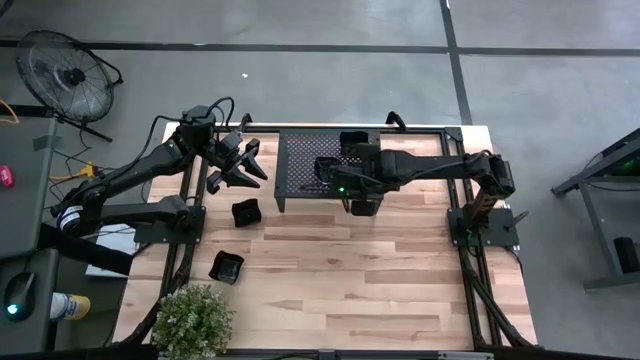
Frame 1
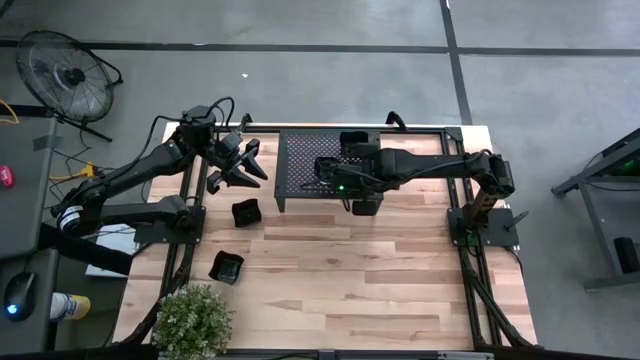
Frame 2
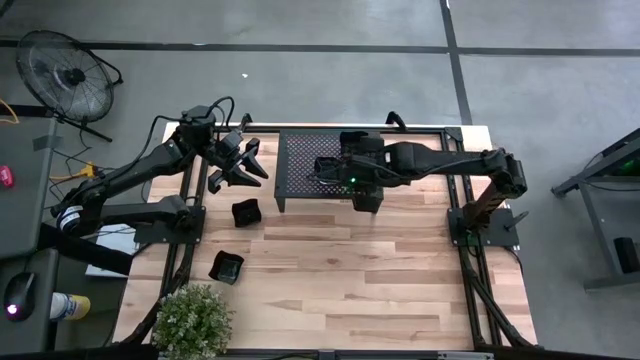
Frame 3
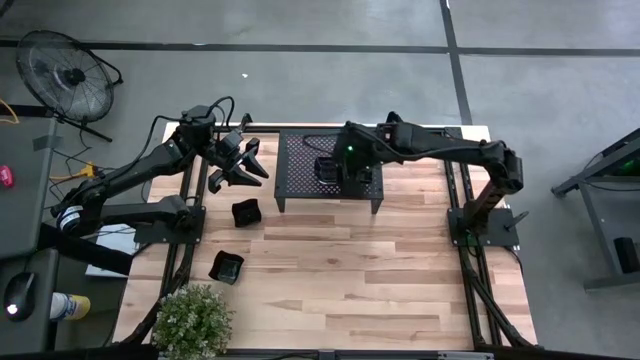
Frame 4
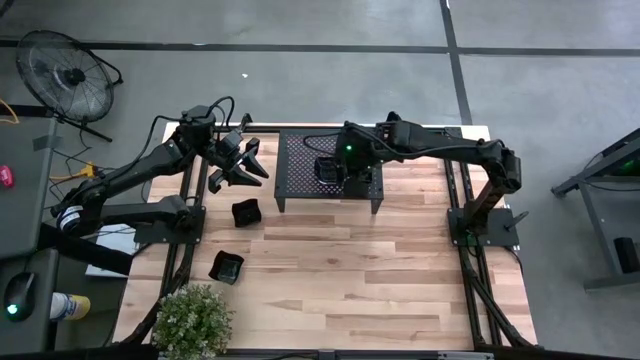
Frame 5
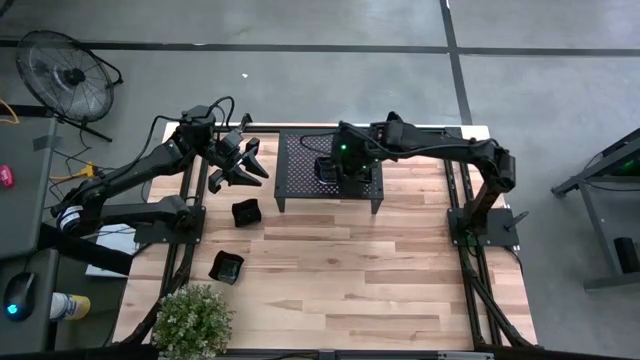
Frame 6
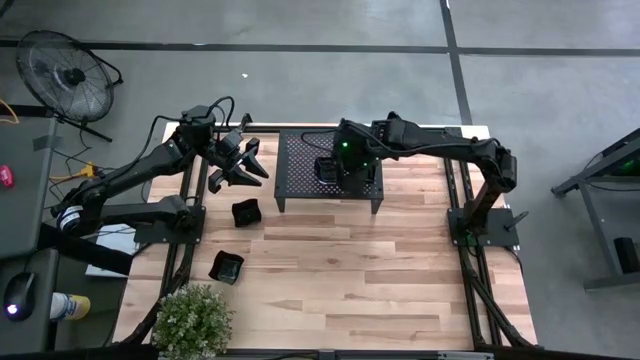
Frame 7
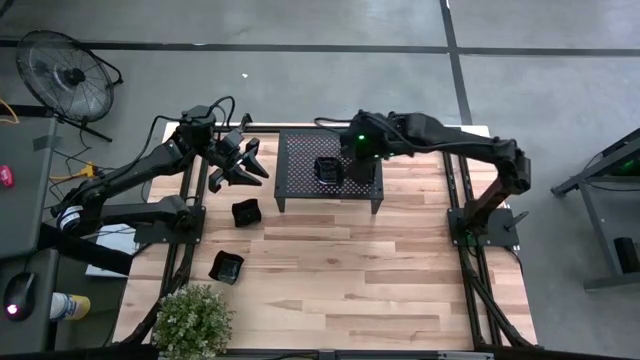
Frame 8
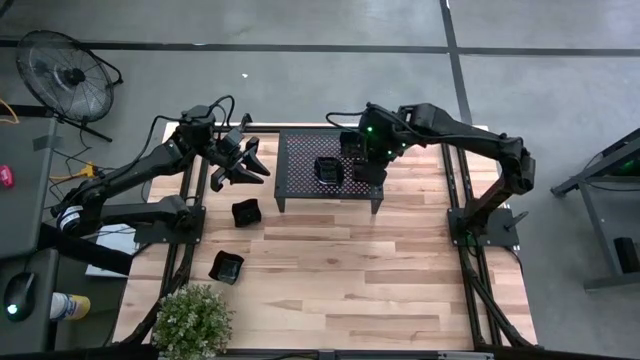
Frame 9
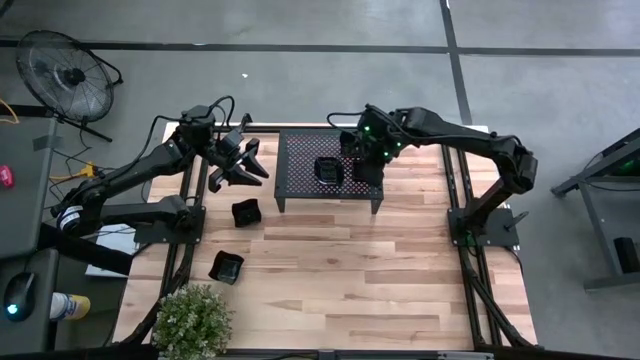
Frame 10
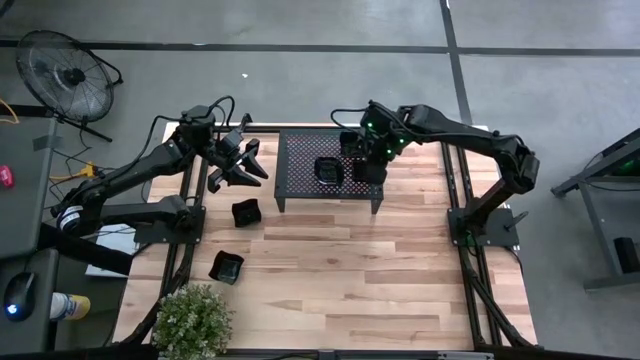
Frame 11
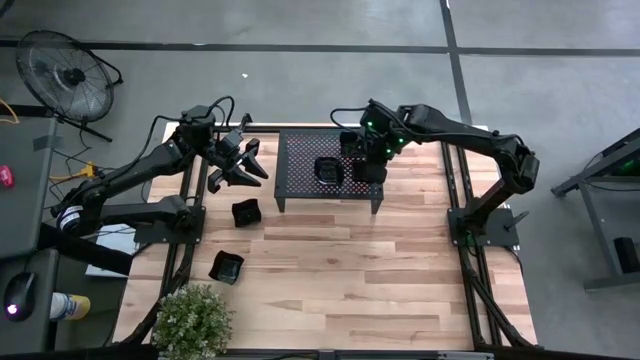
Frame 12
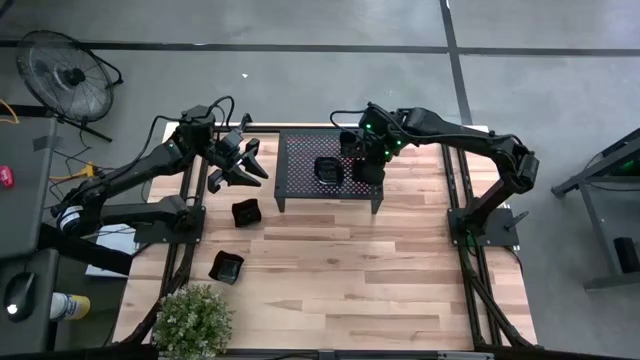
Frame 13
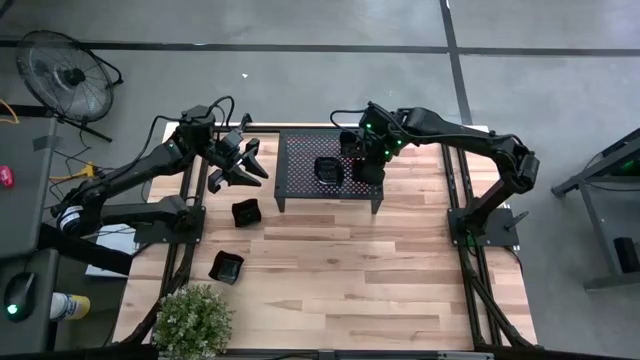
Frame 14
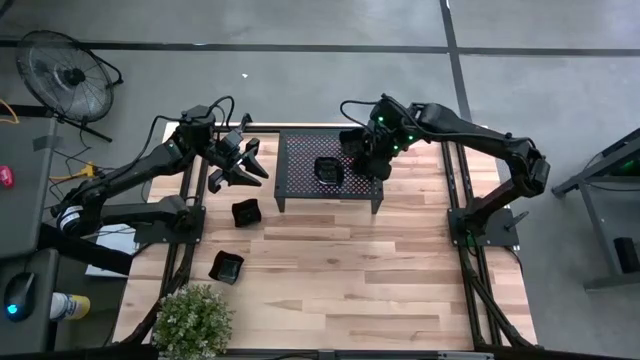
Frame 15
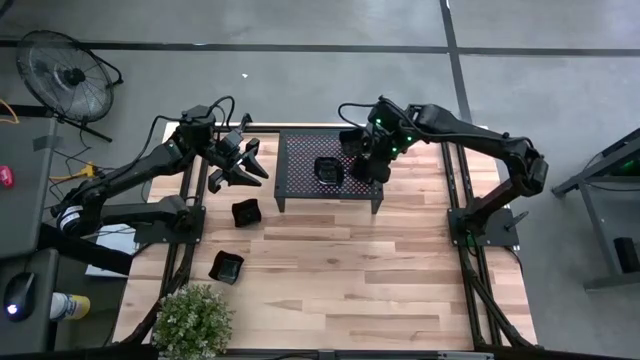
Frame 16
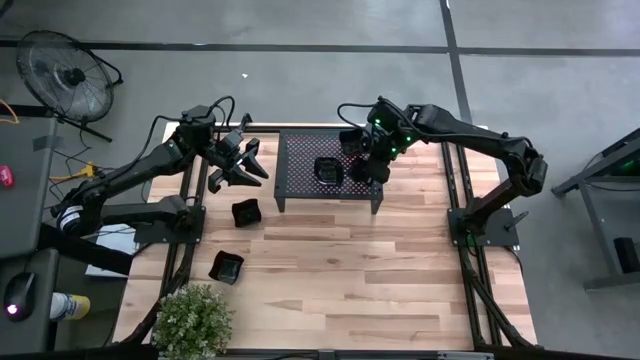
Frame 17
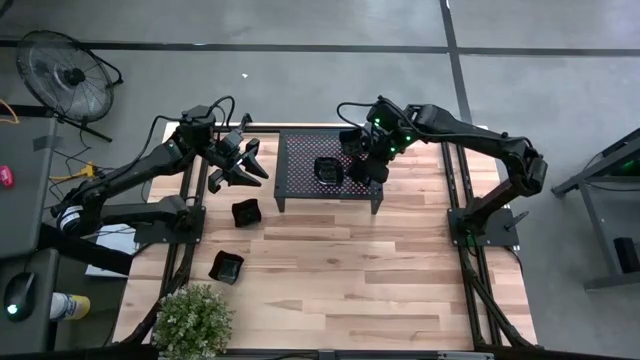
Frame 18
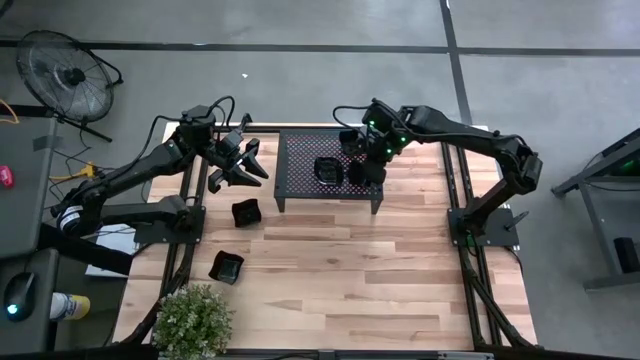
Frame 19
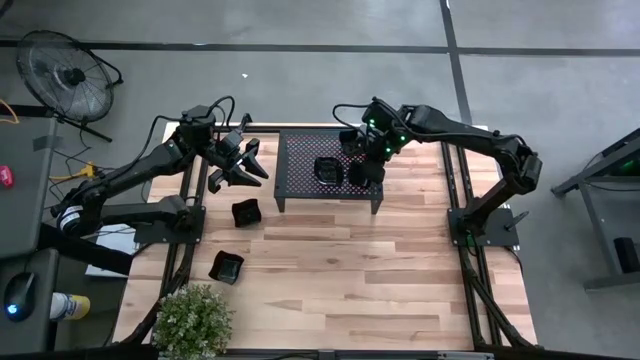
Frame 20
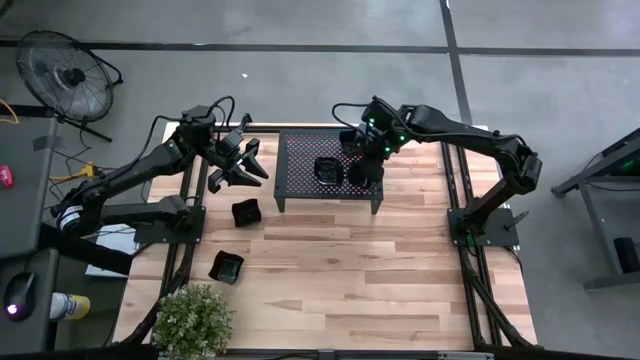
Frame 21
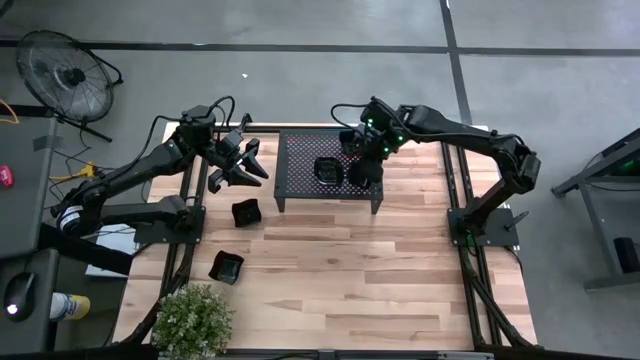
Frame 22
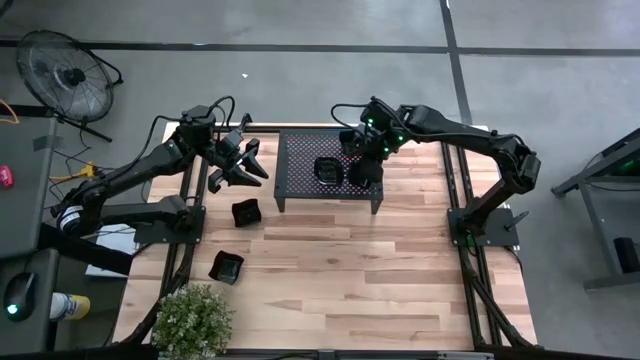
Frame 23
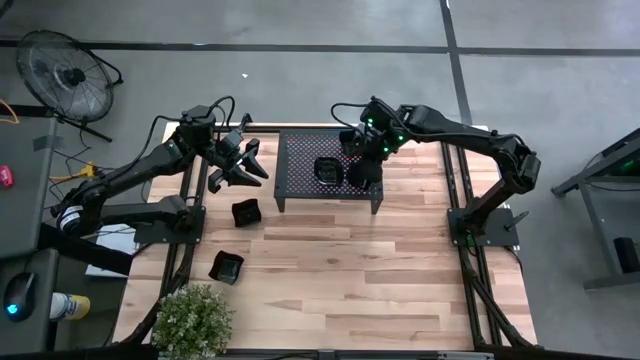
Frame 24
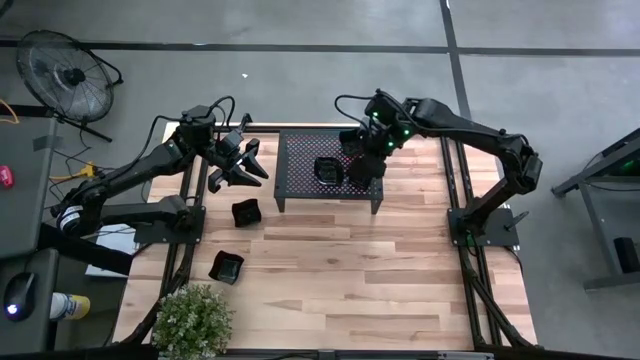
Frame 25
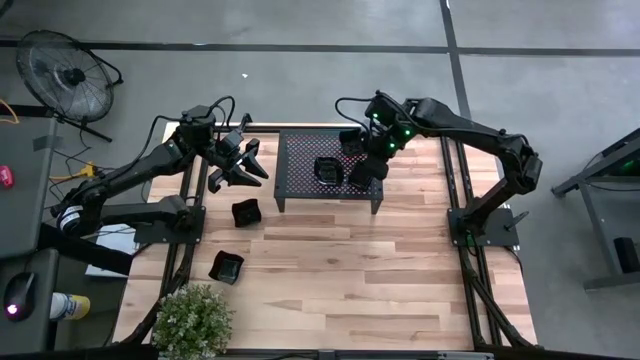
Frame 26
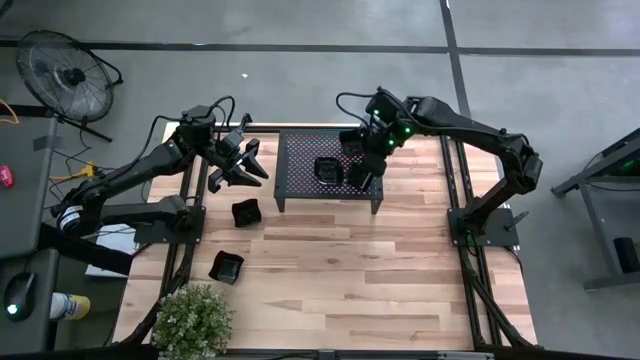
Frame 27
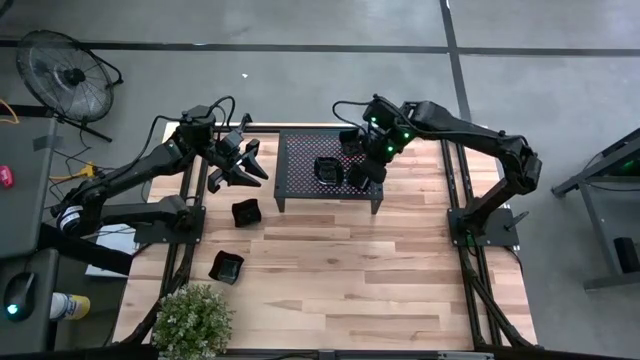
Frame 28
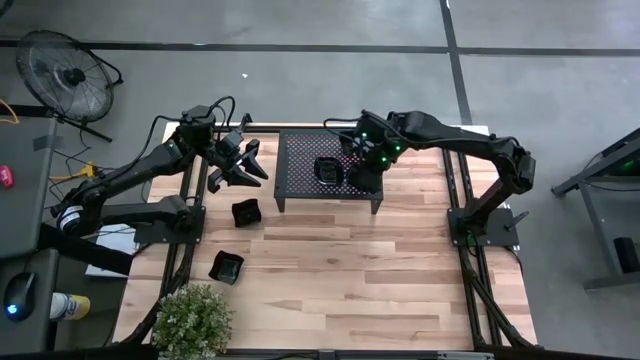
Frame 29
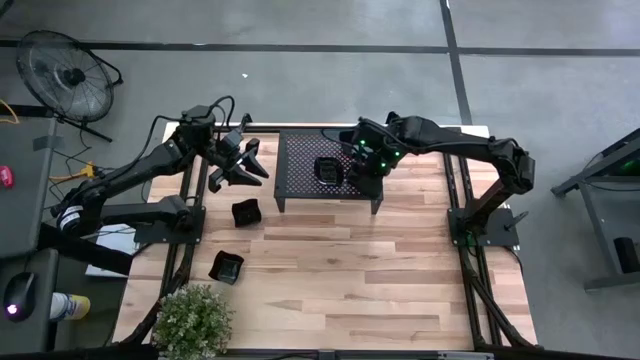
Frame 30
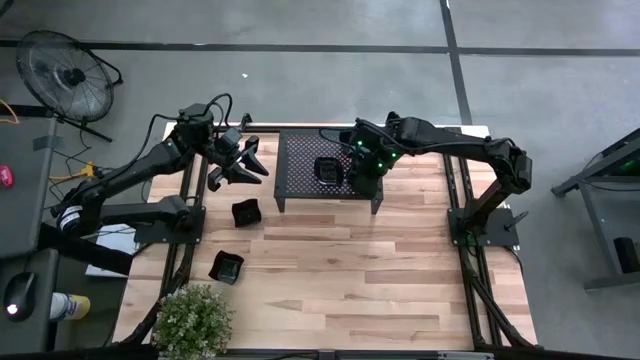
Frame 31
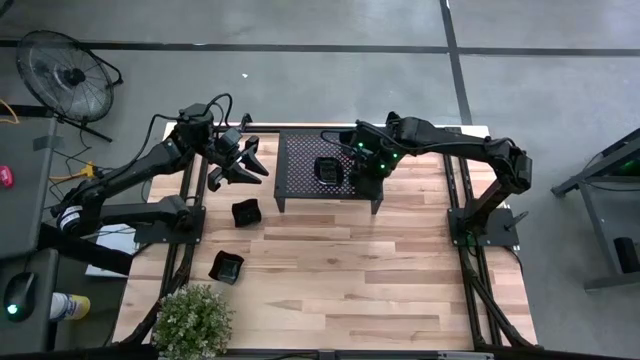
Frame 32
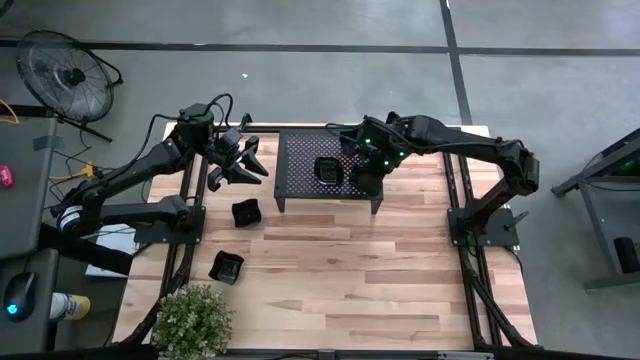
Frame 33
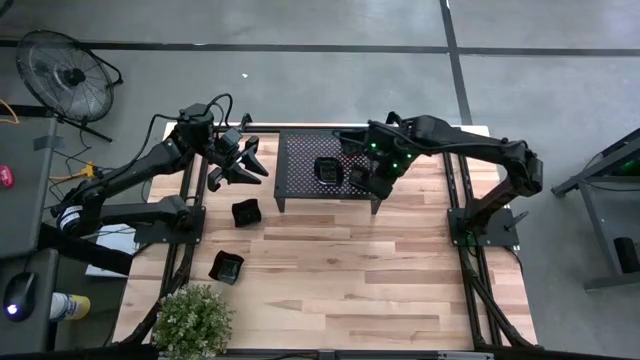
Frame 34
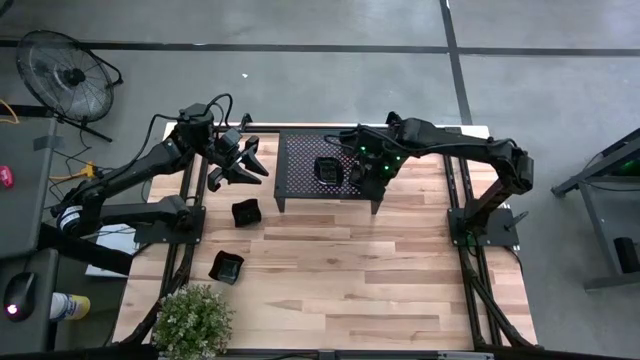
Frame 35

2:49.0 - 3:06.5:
Task: Pick & Place Mini shaped plates
Stack the black square plate on top of the other black square plates on the shelf

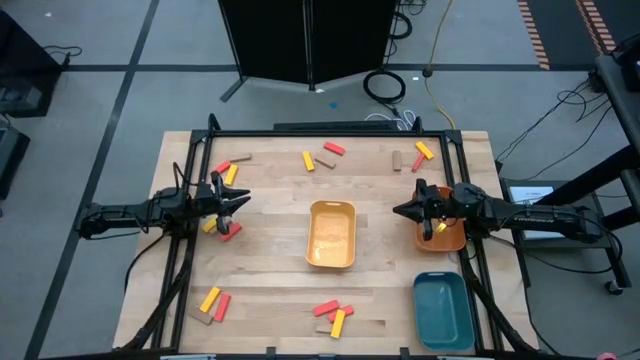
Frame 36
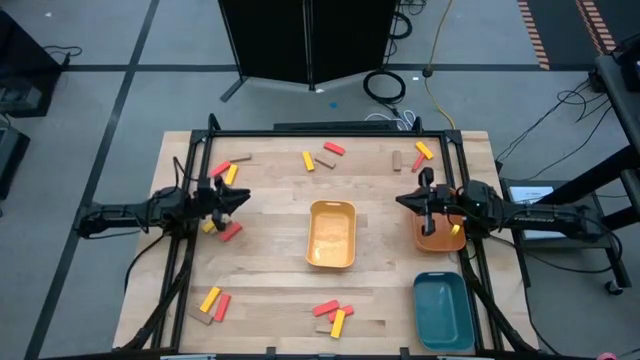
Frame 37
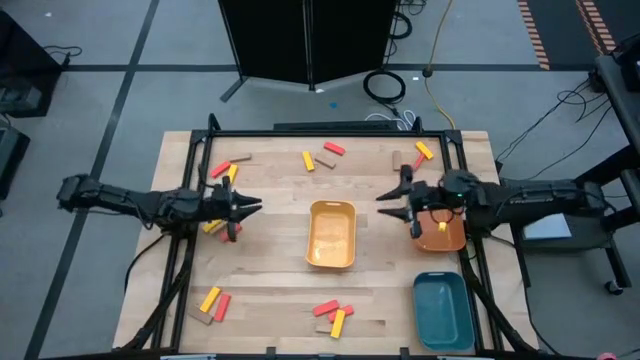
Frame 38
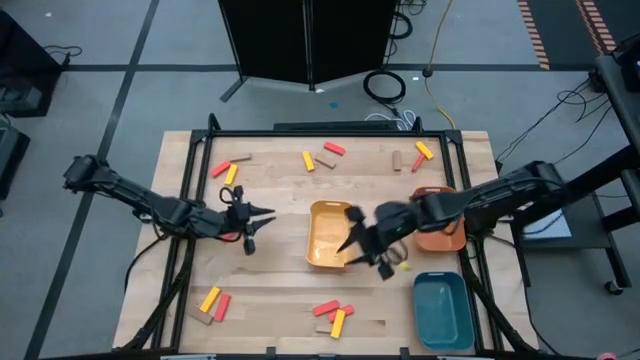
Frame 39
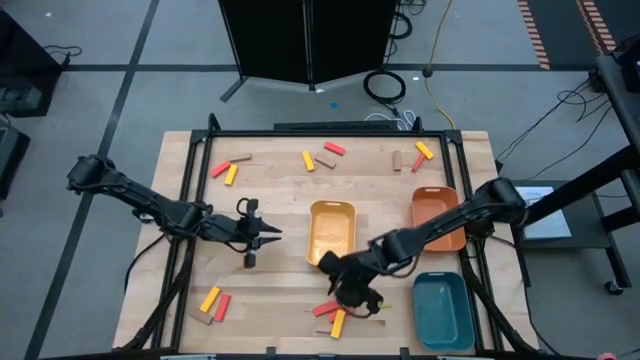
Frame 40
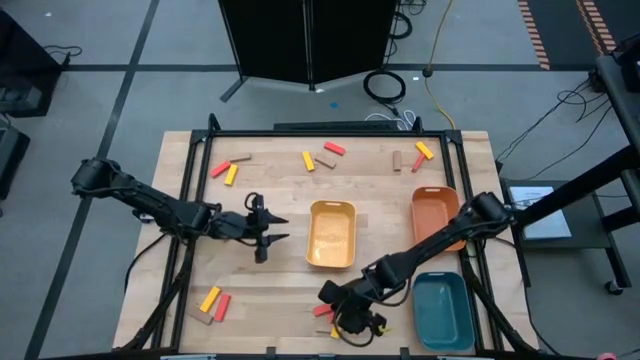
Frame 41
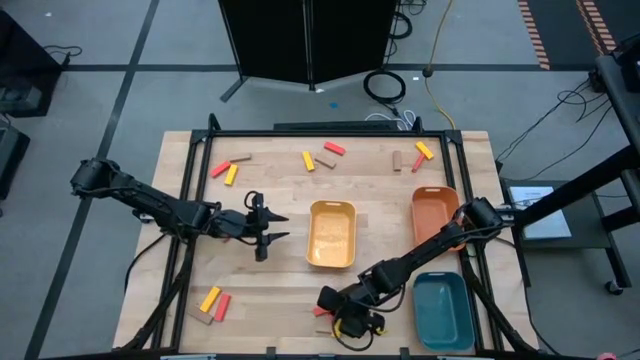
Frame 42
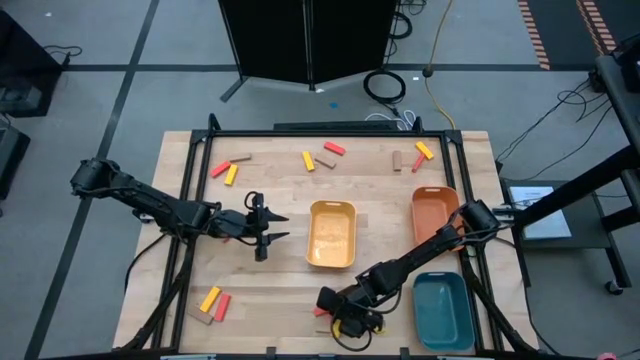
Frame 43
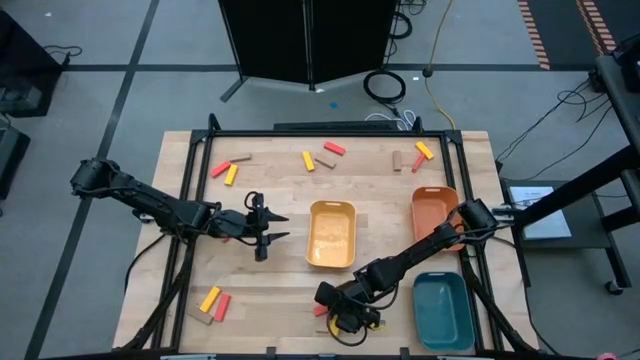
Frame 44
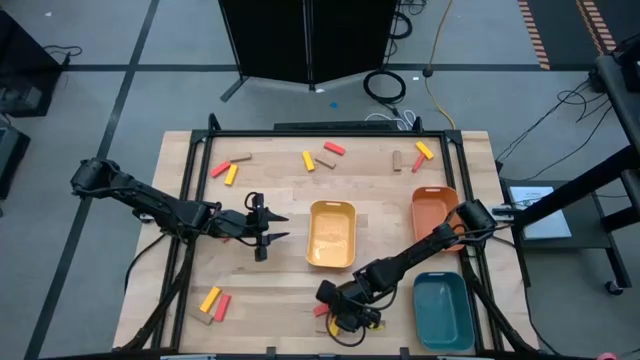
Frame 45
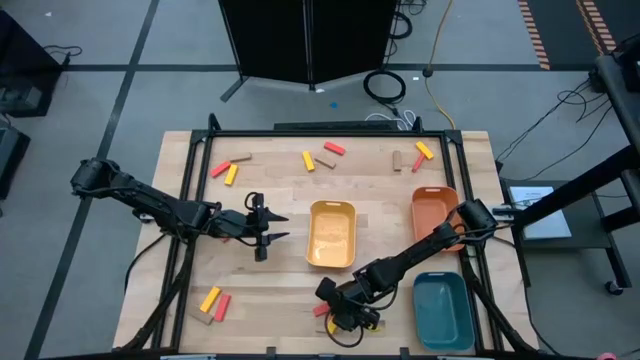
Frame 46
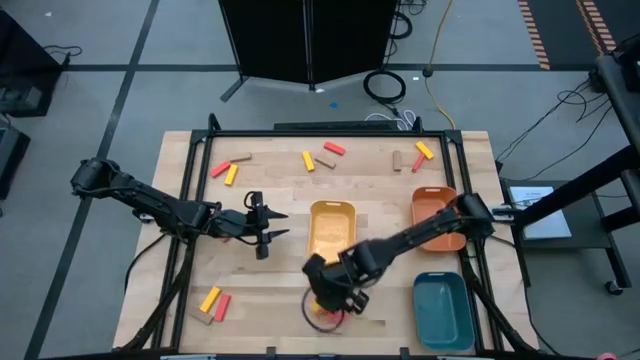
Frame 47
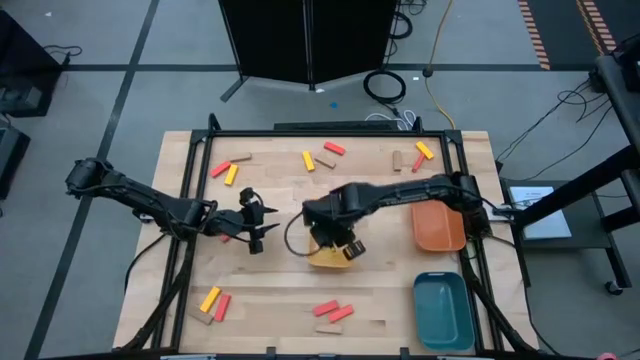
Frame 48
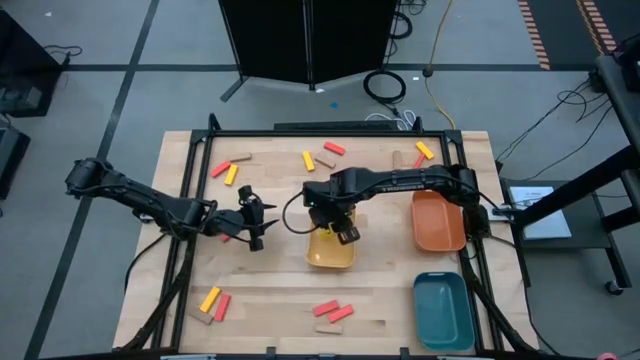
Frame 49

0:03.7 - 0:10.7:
Task: Sort blocks
Put the yellow wooden block into the yellow bin
